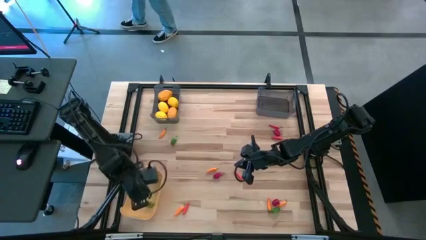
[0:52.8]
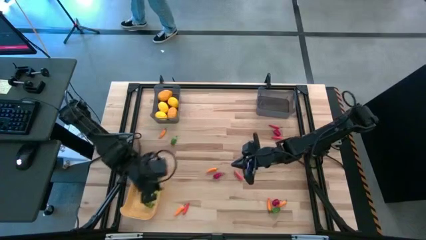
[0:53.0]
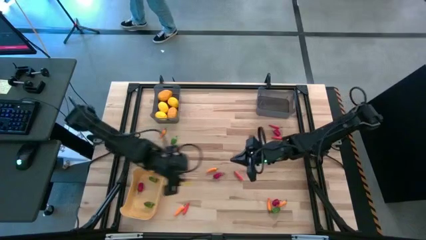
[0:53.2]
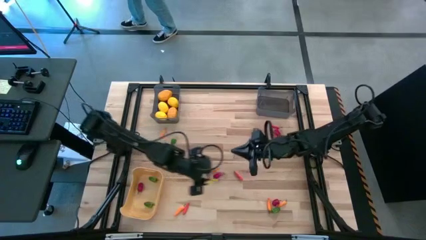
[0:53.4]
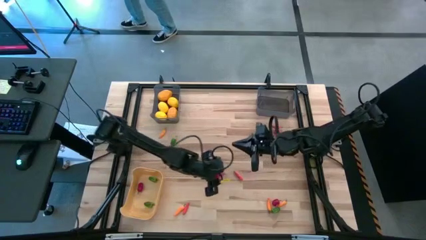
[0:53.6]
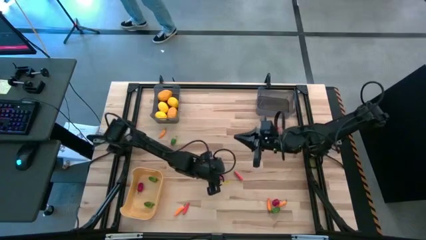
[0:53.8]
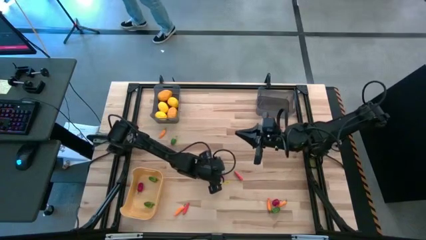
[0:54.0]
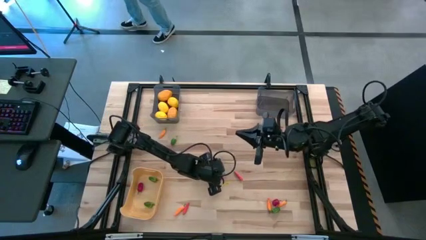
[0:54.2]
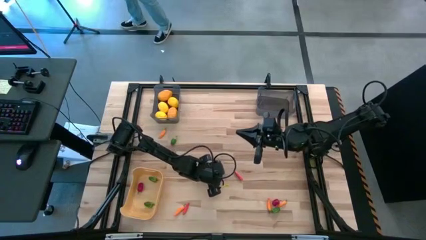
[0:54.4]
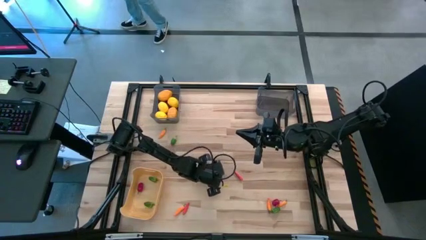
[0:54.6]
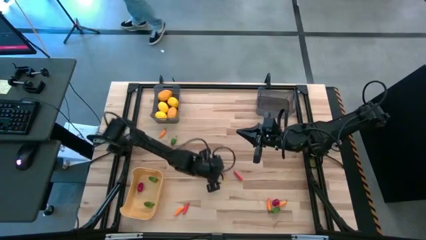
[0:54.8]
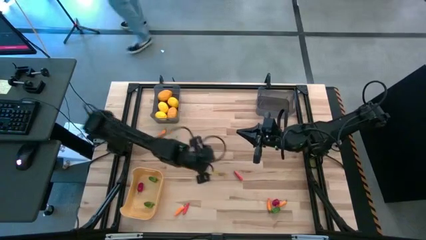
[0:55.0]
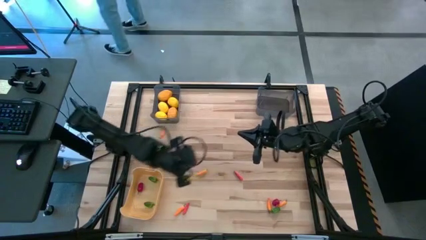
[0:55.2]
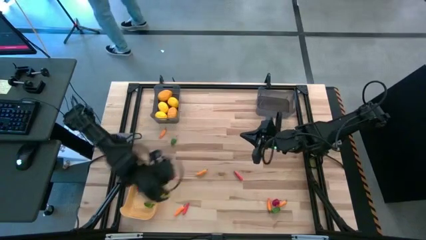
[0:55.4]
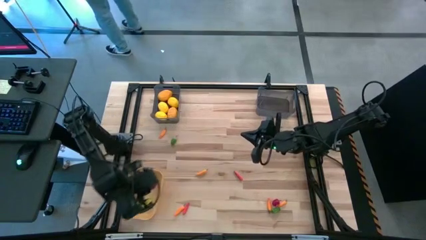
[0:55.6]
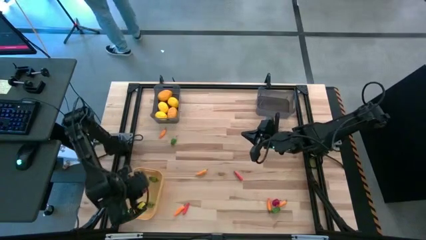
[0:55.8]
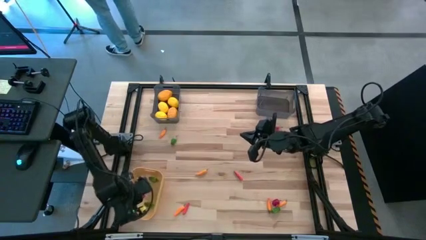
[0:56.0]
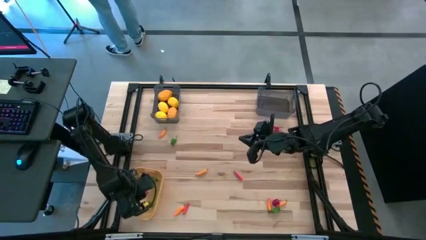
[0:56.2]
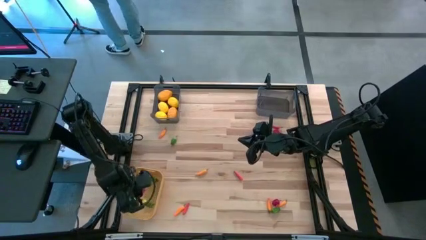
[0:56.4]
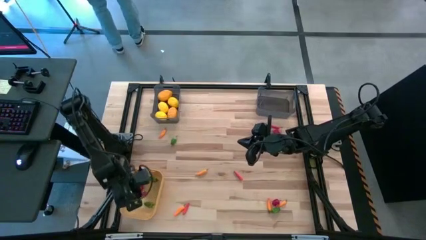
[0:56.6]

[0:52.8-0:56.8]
Task: Sort produce into baskets
Put the center red bell pepper into the yellow bin

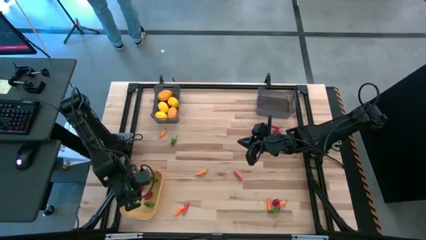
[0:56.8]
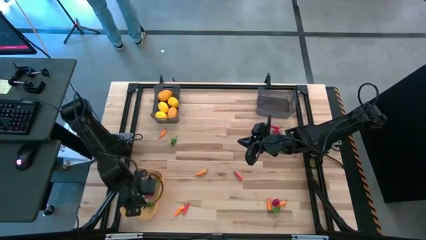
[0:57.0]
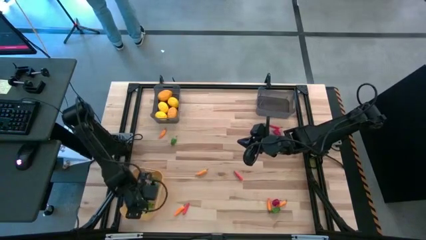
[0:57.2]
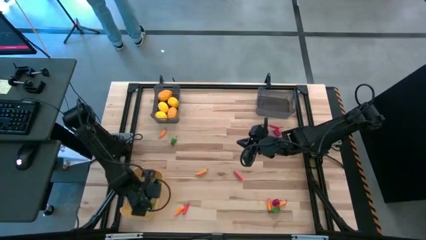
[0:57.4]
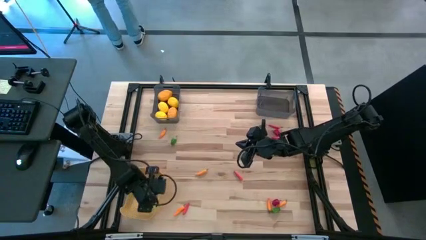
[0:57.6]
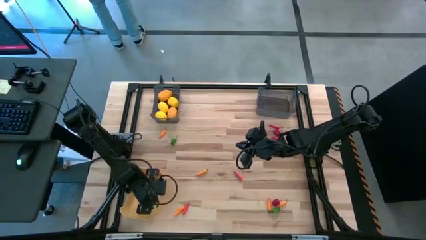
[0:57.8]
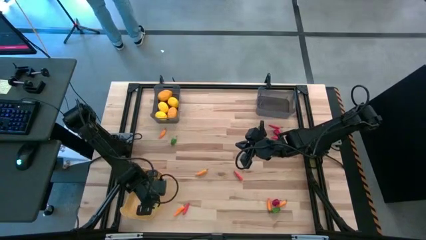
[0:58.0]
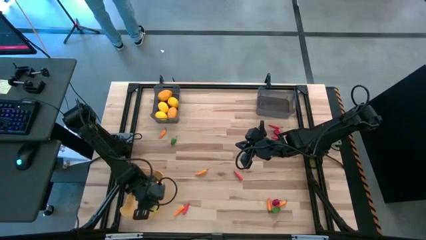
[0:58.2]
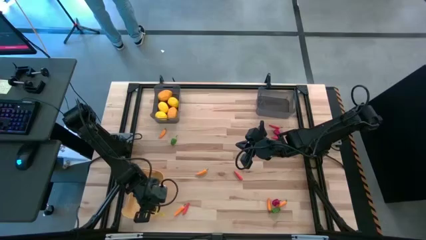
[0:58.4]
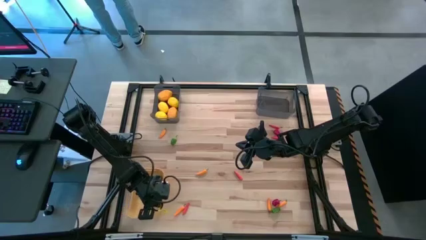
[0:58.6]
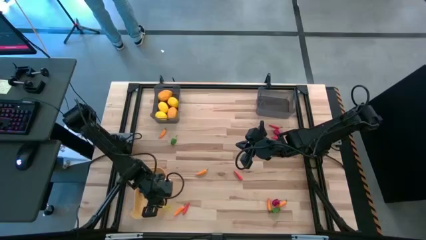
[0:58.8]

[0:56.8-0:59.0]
Adjust the yellow bin

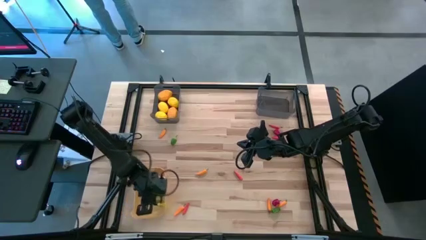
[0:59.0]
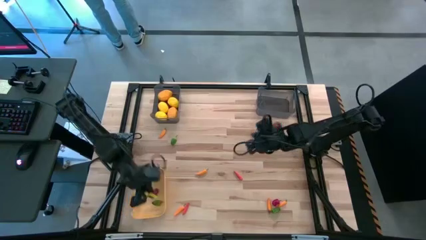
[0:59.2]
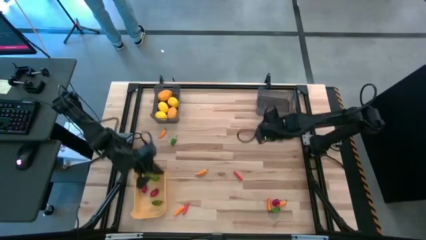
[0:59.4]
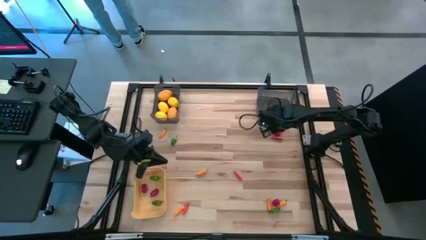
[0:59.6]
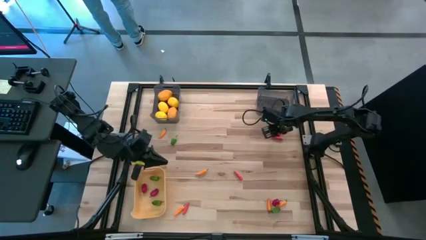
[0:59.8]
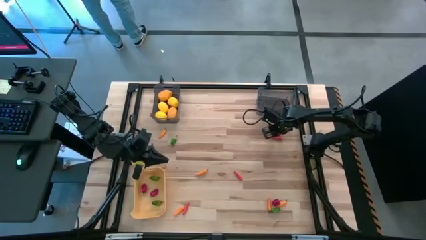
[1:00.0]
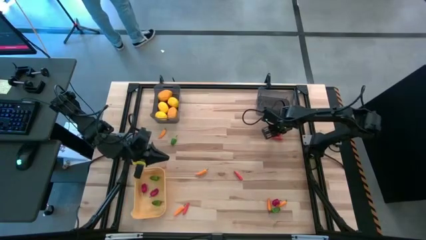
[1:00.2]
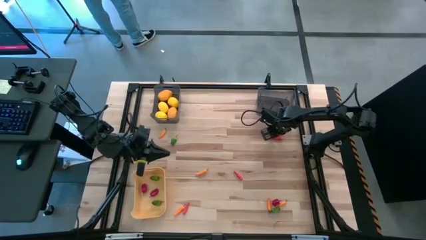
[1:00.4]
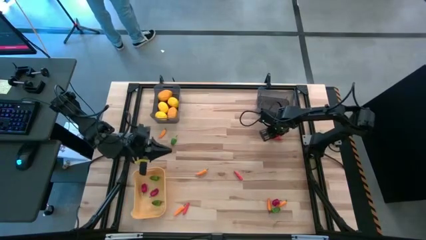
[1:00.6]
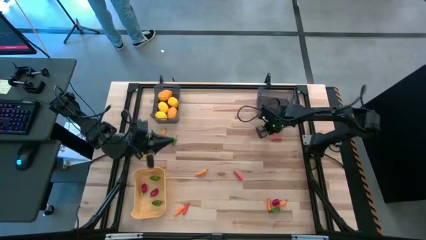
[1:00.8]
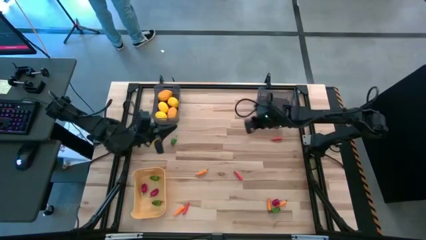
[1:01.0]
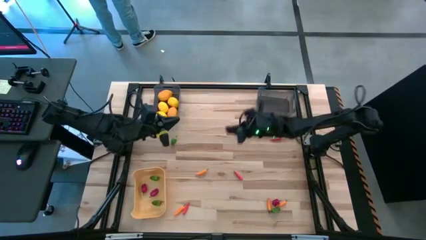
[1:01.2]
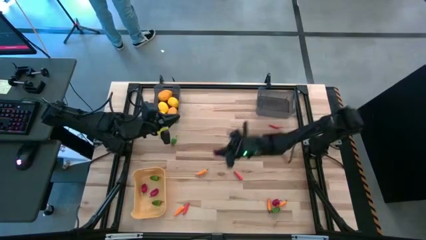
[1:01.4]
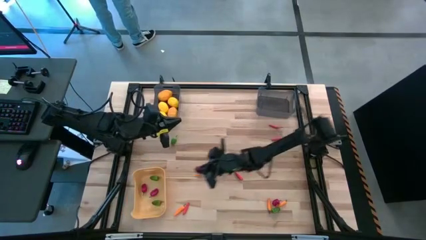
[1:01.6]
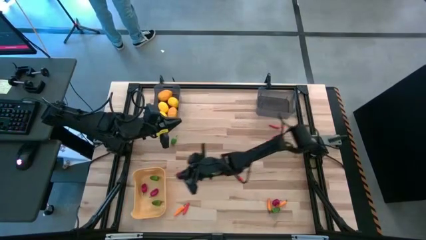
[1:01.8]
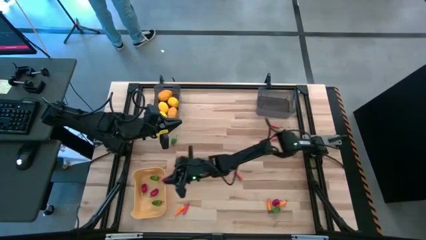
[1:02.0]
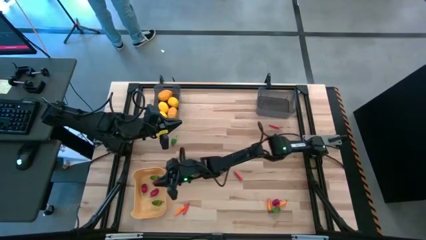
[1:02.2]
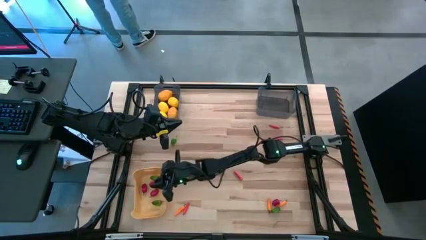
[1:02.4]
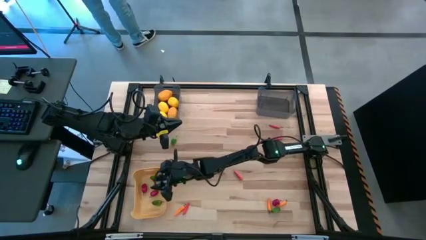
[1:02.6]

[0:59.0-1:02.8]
Put the top red bell pepper into the yellow bin

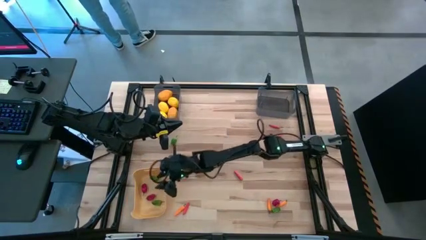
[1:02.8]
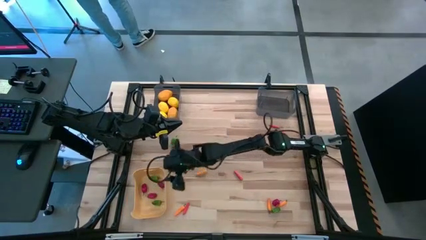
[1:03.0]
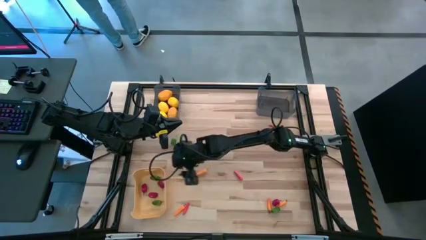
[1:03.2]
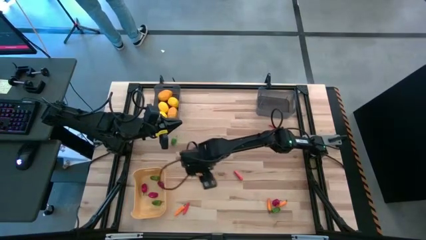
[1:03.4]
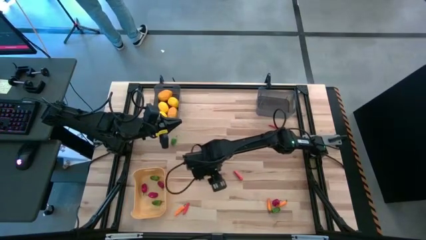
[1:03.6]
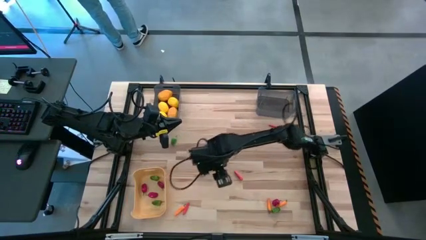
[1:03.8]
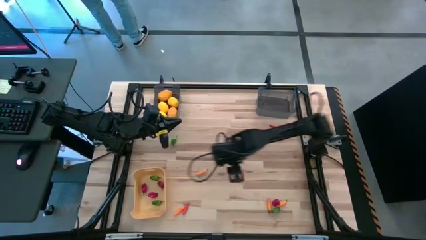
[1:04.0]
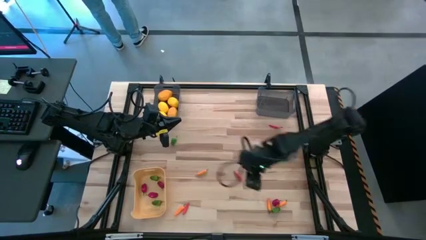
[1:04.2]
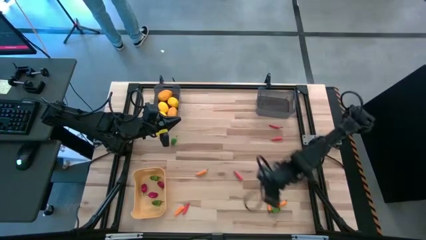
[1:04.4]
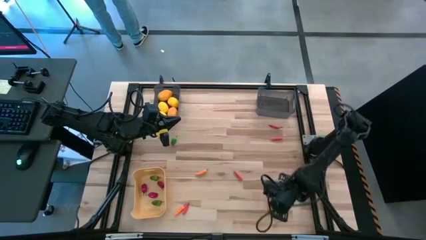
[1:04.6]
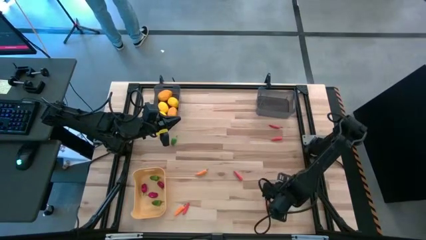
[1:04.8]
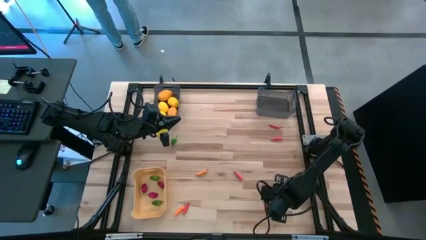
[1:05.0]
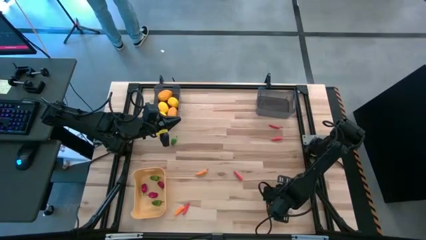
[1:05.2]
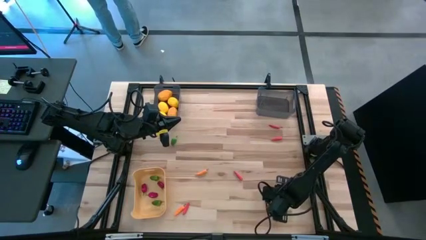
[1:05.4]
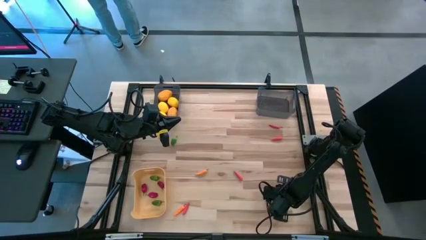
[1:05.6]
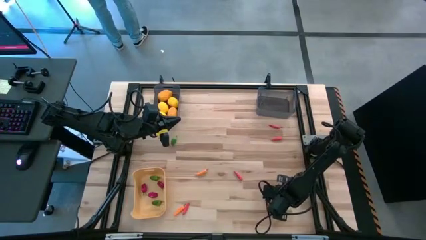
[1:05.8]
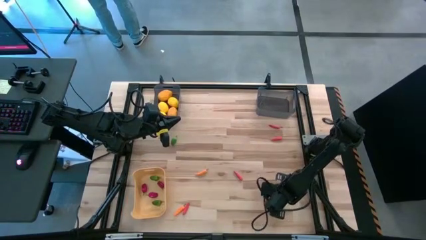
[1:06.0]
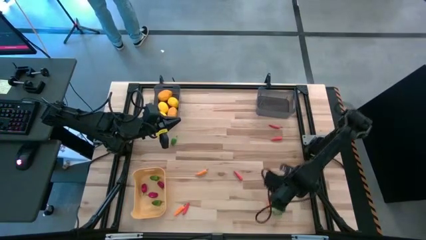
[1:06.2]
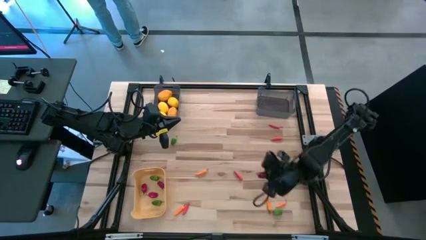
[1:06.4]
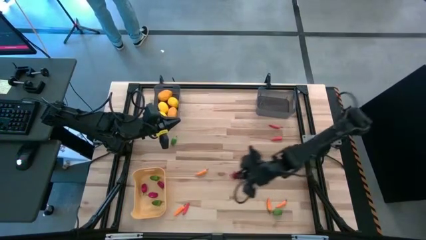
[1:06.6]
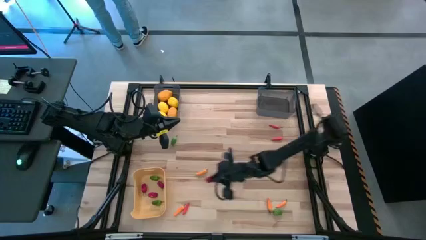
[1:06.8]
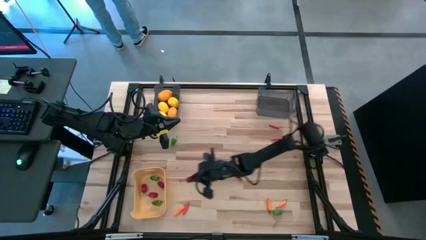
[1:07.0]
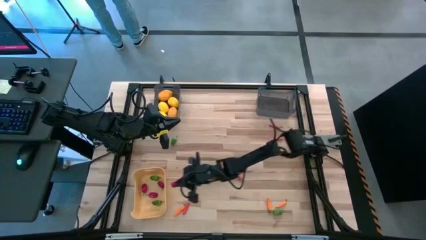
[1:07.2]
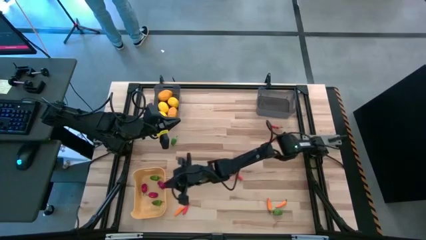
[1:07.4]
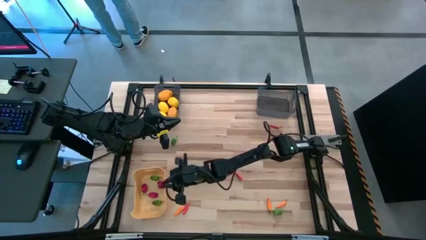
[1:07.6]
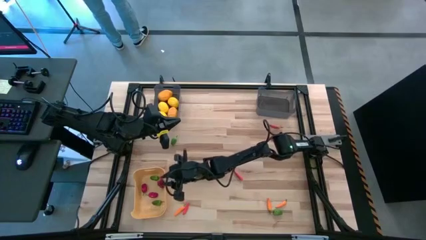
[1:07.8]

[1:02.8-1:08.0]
Put the red bell pepper into the yellow bin

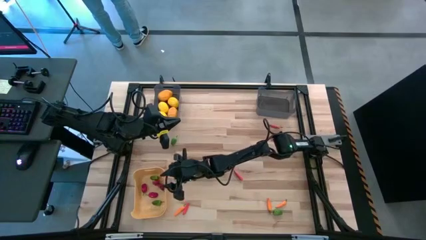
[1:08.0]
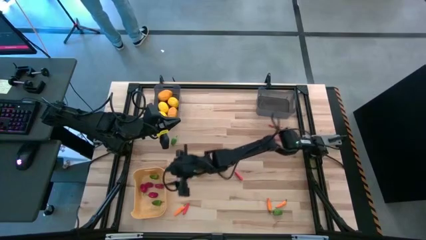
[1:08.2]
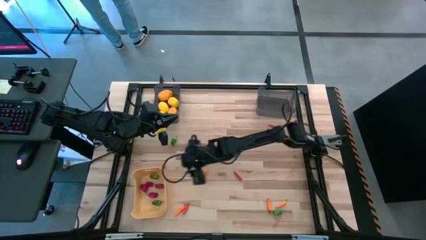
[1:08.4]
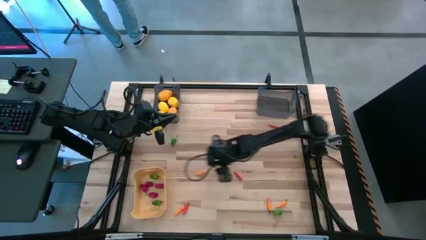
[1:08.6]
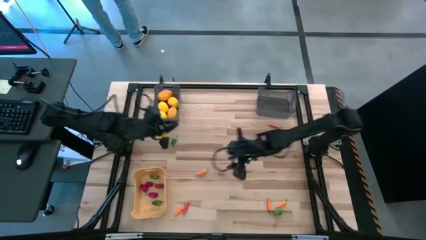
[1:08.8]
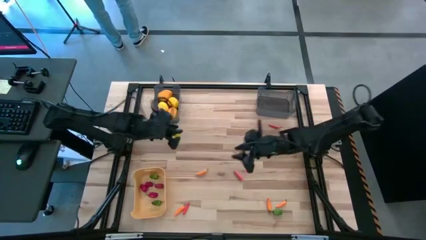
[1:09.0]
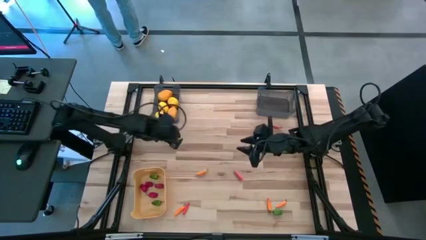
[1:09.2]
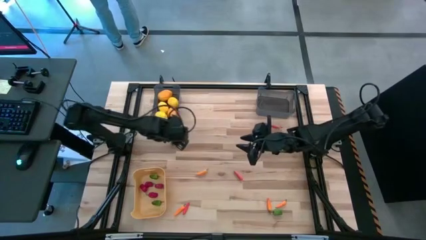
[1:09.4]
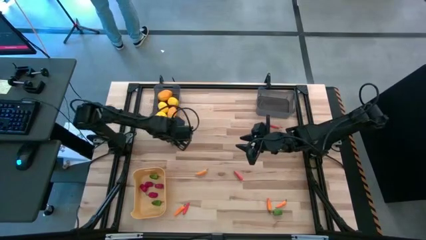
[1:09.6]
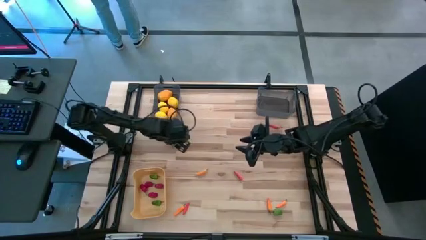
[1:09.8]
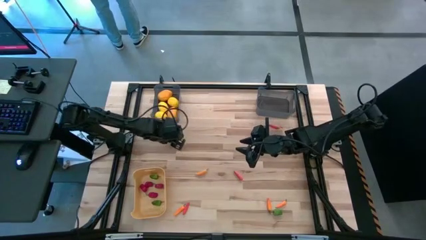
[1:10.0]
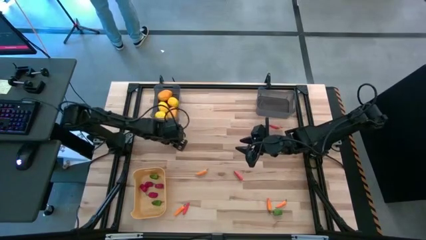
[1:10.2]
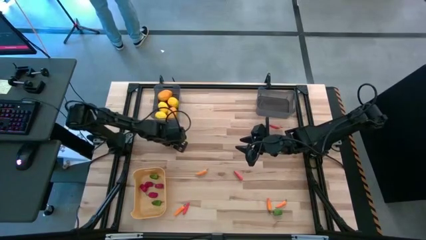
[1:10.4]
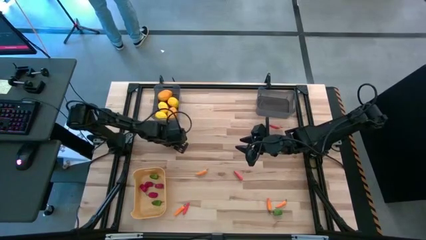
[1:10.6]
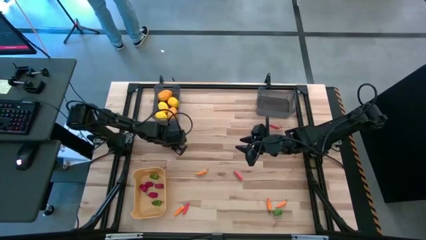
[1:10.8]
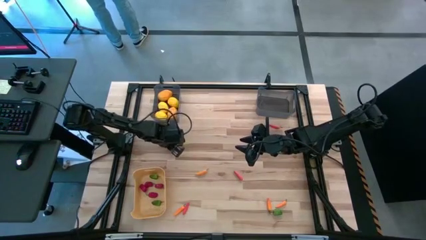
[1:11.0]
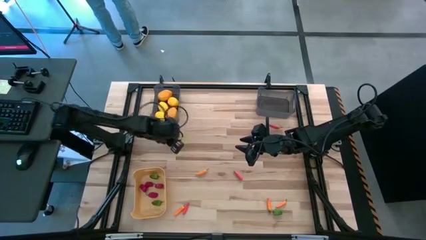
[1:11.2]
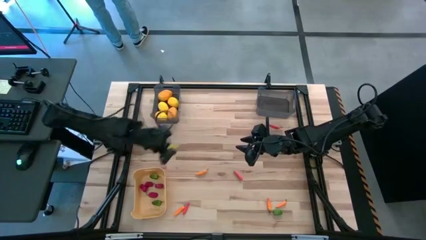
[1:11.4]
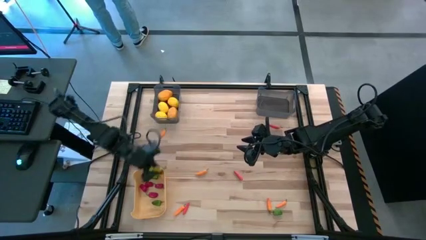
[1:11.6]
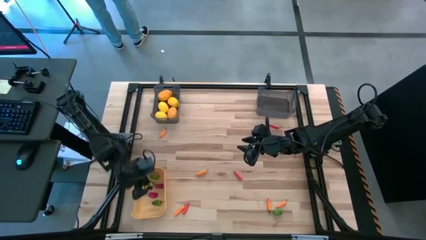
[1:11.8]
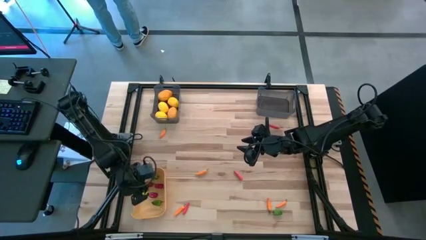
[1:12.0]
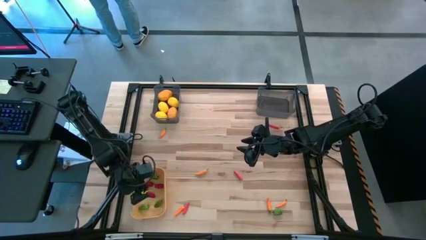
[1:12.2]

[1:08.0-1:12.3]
Put the top green bell pepper into the yellow bin
